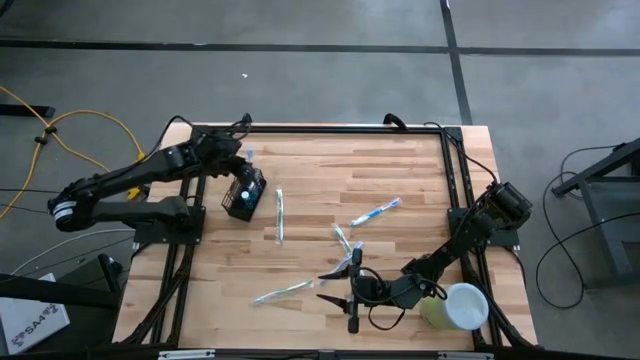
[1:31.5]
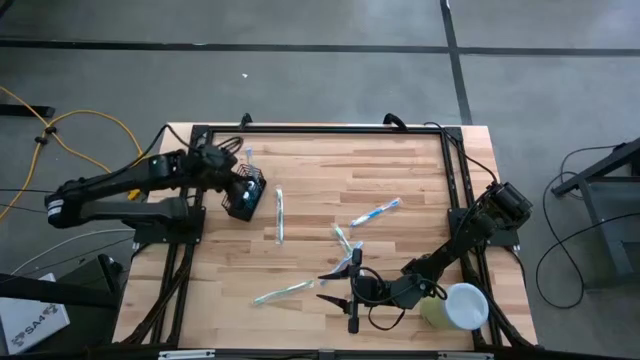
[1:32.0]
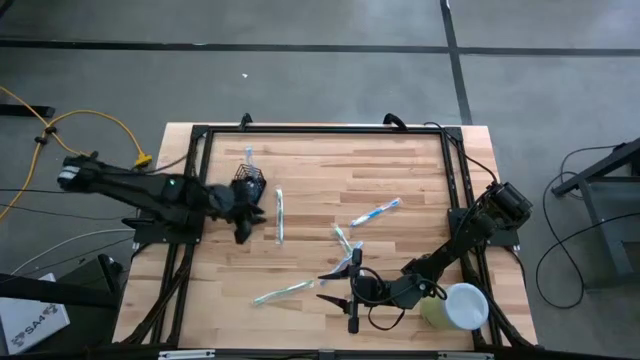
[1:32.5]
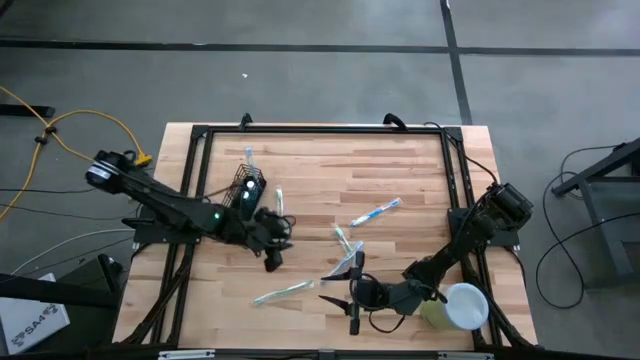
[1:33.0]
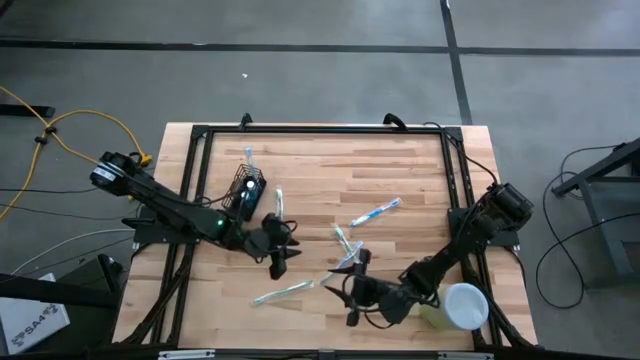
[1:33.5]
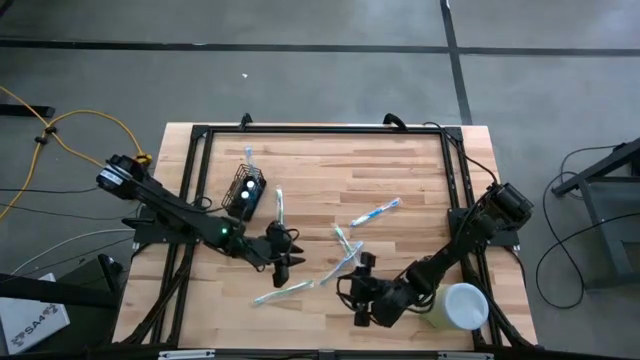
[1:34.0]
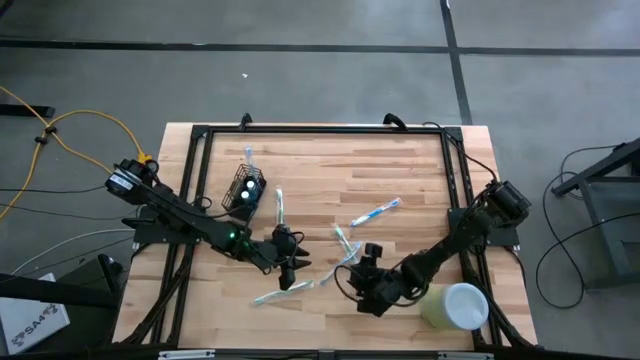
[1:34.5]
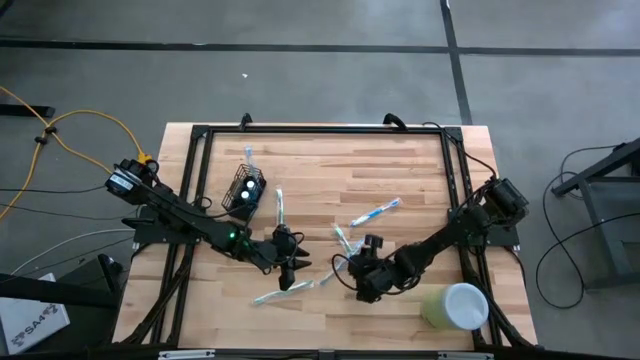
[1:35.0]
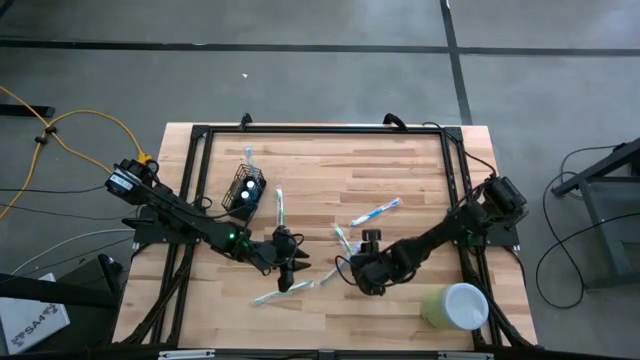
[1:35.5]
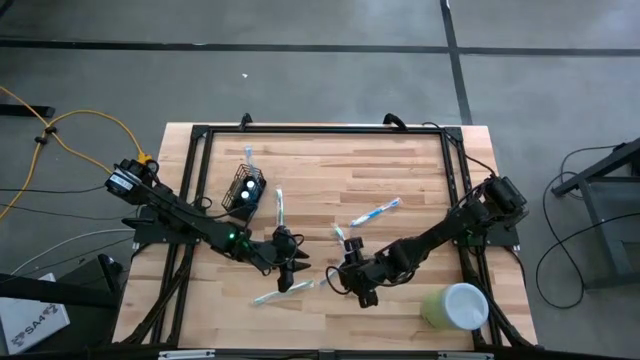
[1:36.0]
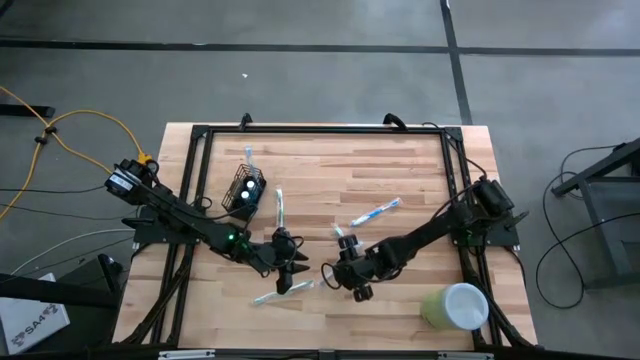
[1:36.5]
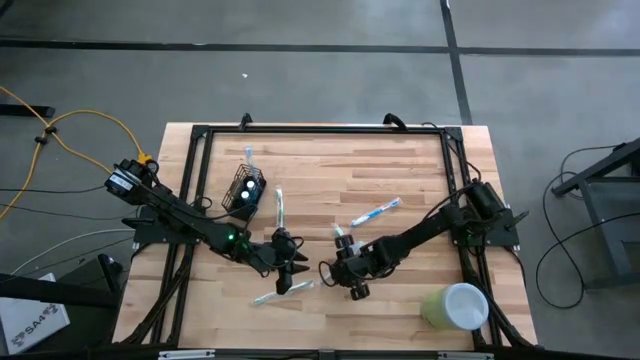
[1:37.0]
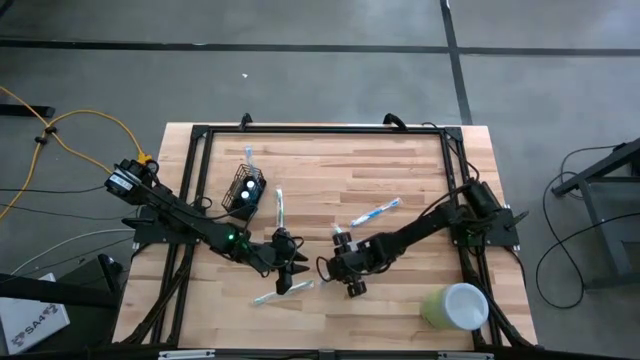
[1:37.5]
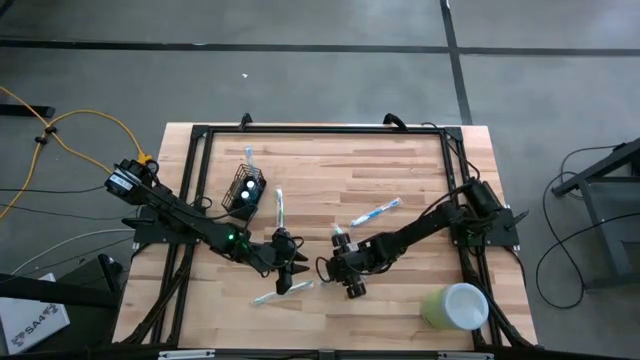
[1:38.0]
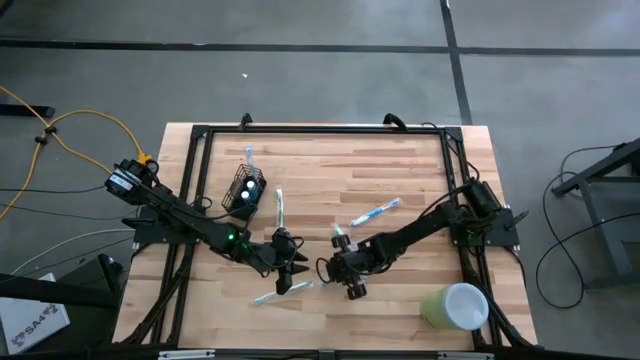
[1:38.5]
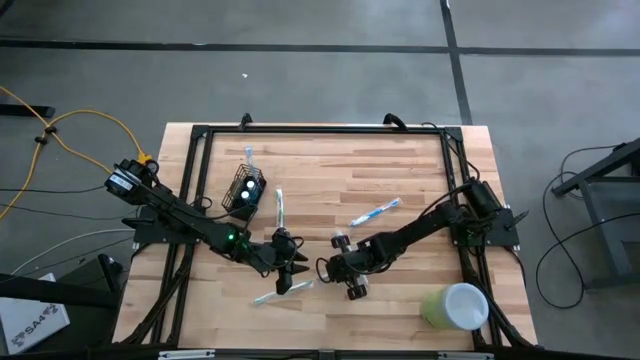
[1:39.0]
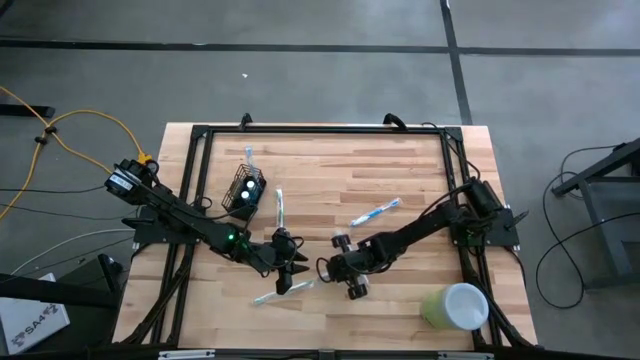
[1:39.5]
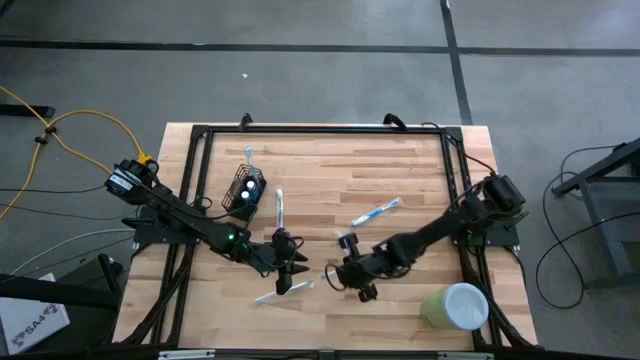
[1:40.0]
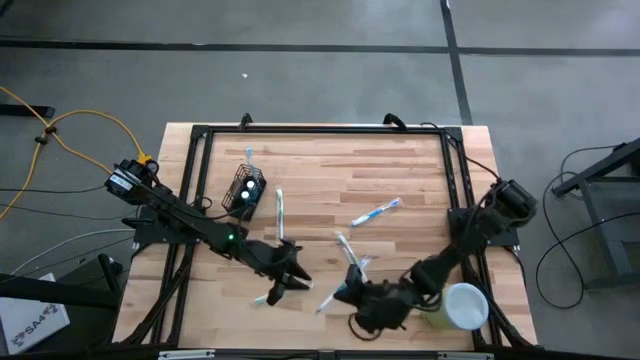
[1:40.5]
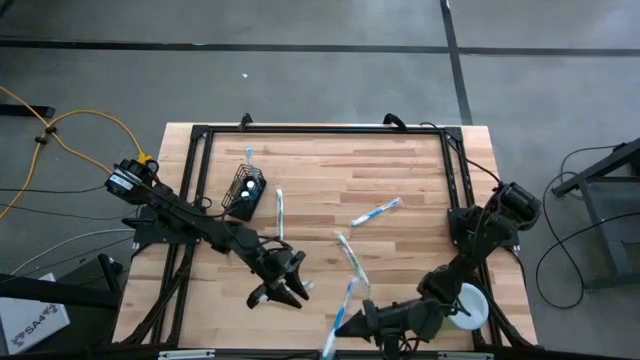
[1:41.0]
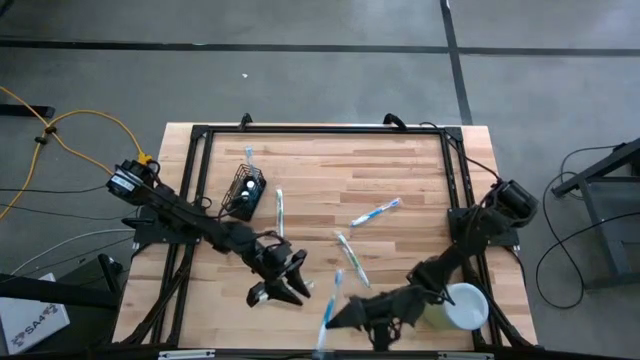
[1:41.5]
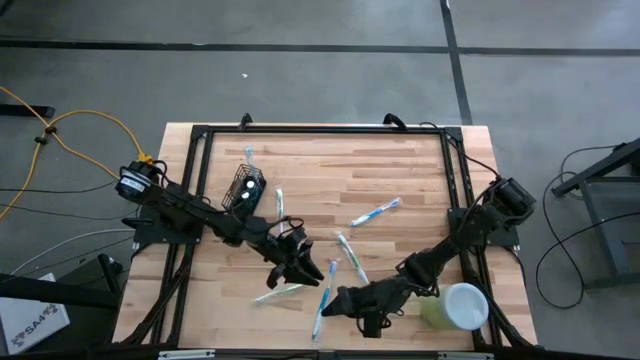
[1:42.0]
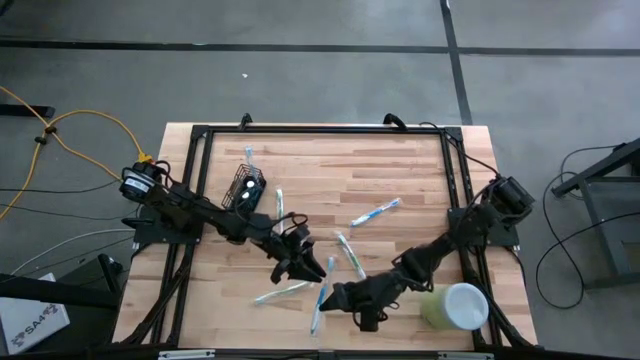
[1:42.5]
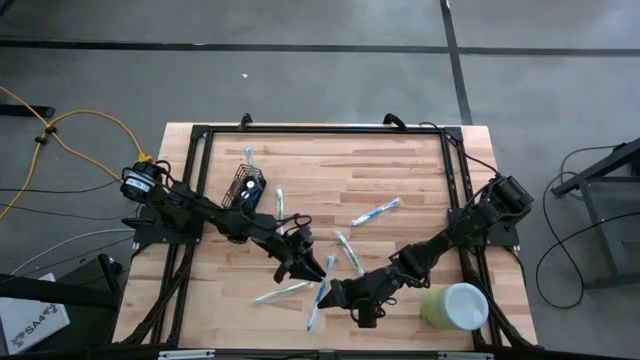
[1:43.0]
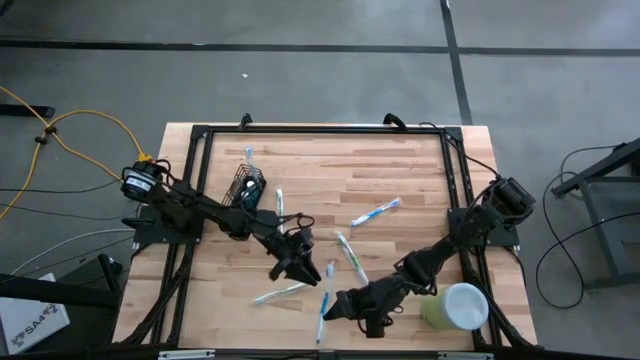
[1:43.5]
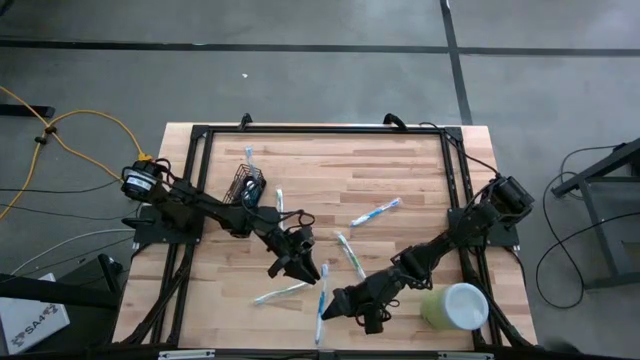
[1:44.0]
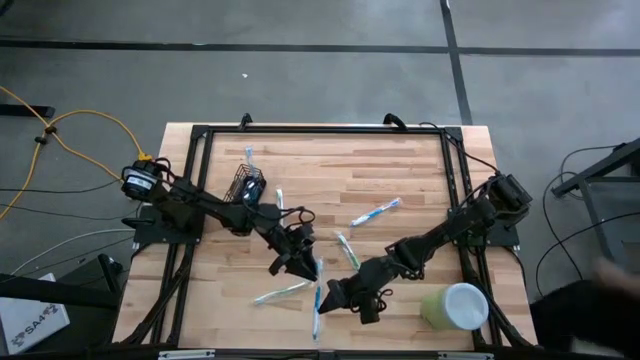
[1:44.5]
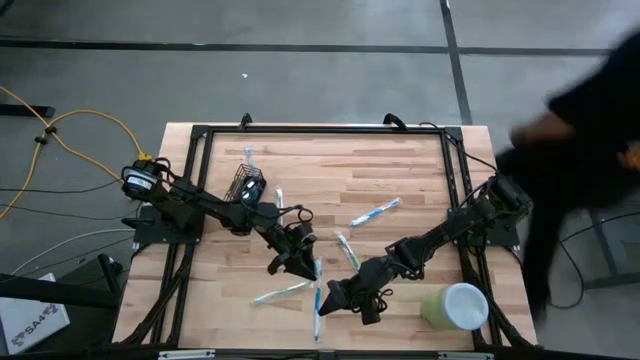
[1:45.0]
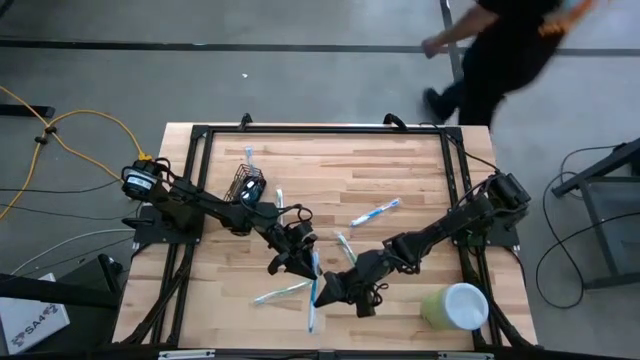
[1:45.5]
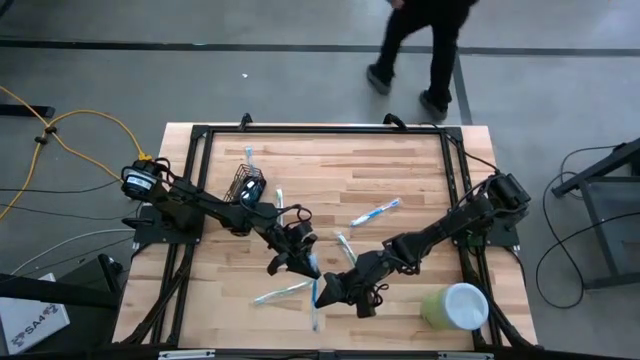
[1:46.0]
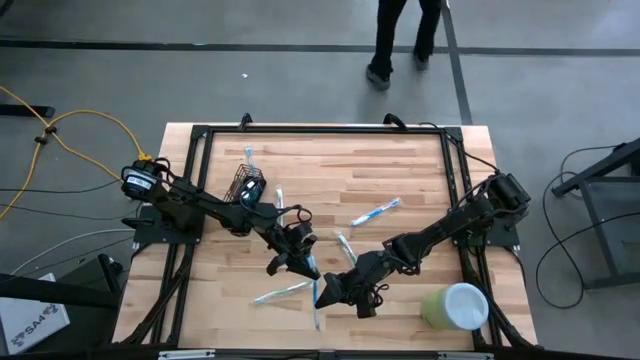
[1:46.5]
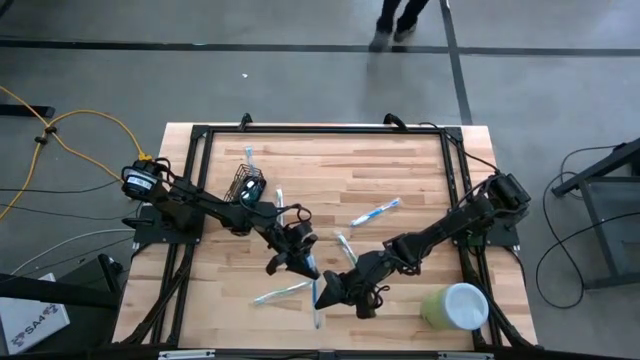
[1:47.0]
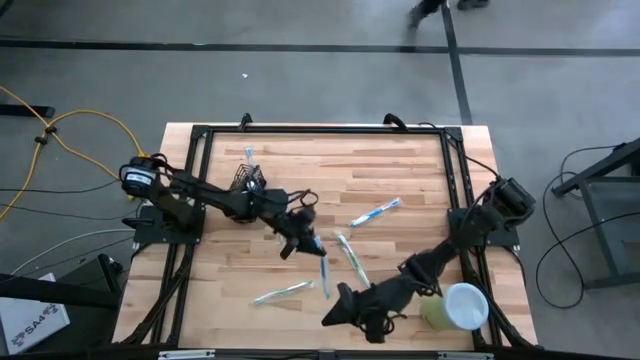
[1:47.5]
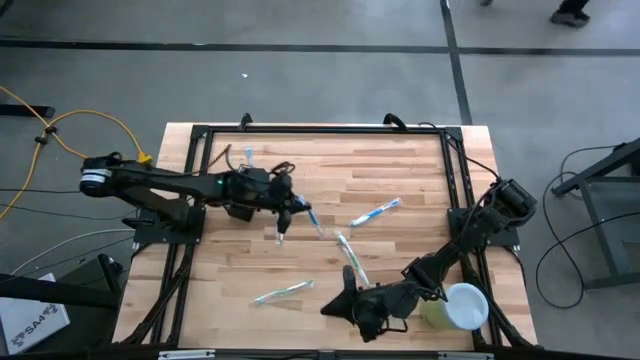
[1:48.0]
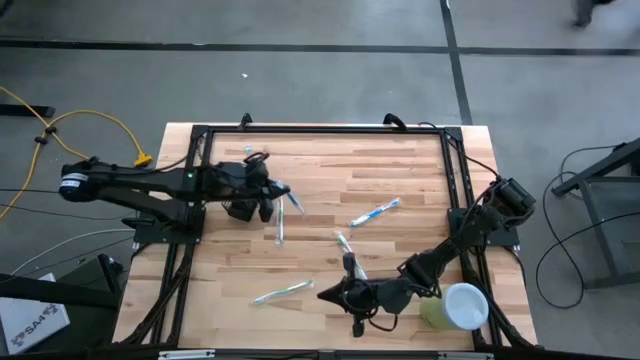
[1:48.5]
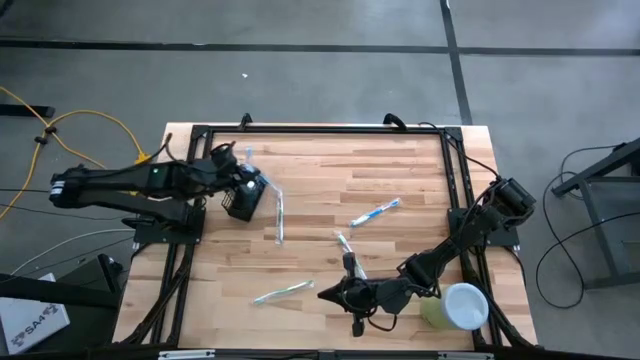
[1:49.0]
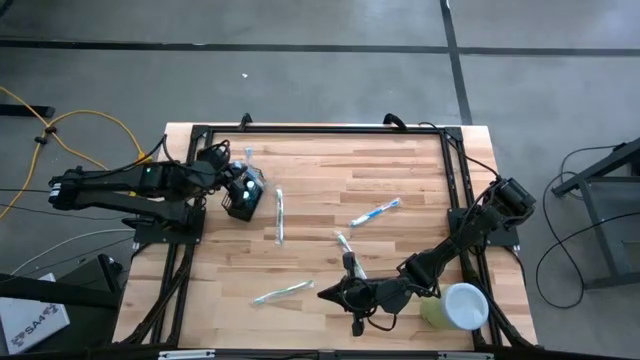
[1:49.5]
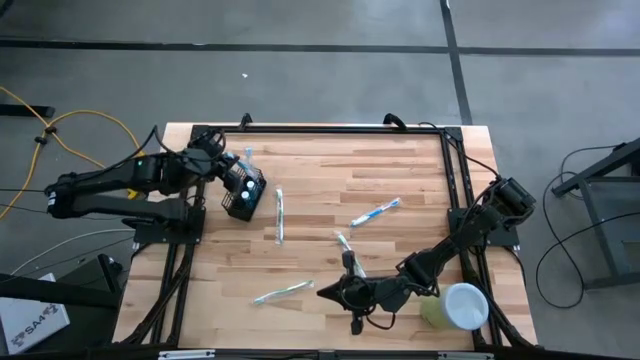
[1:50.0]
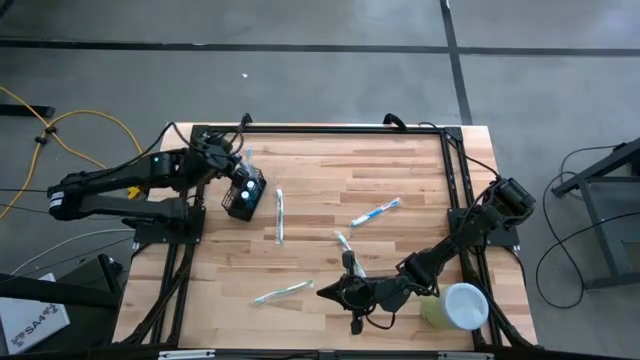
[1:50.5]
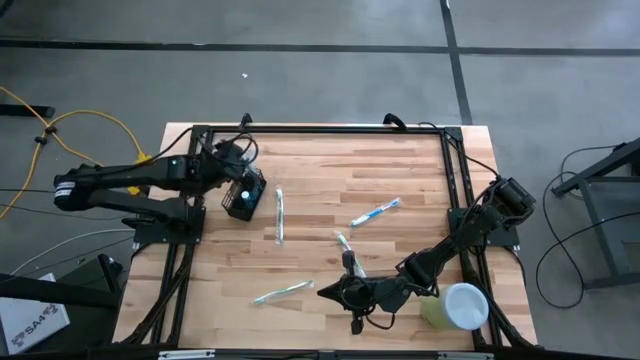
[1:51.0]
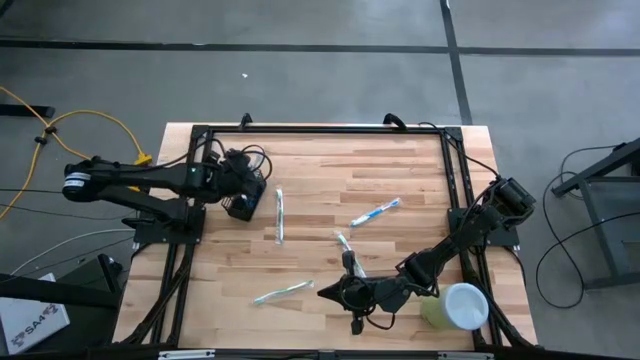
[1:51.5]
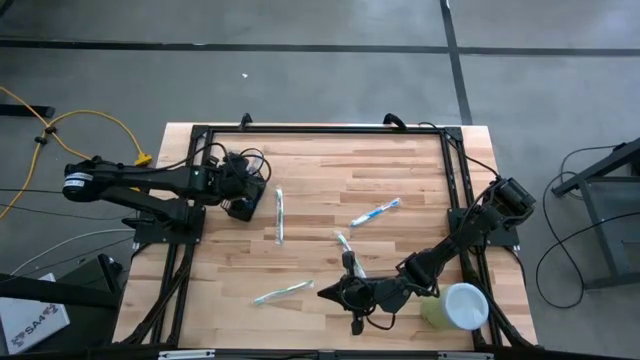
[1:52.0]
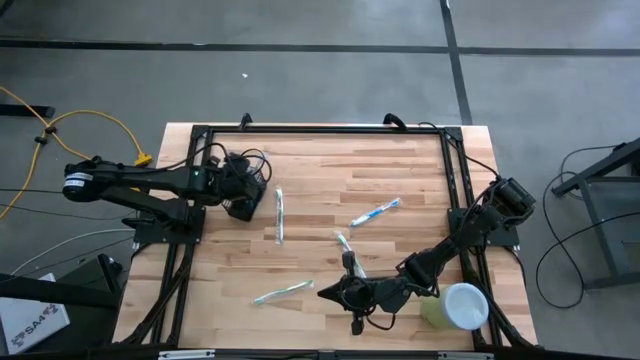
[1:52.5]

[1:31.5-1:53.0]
Task: Pick & Place toothbrushing station
Put the bottom blue toothbrush into the black wire organizer
